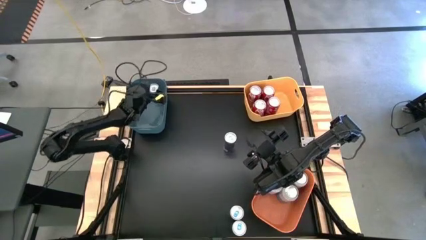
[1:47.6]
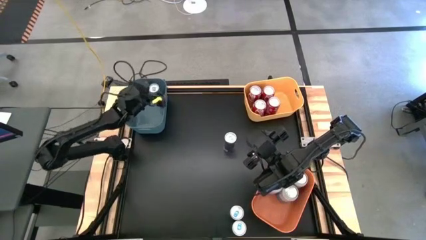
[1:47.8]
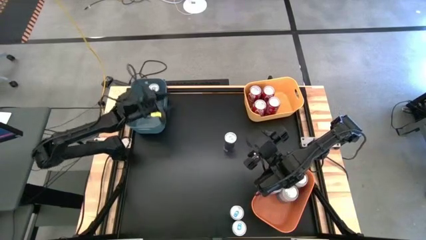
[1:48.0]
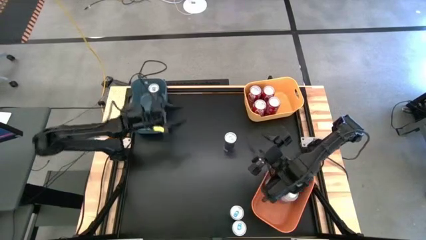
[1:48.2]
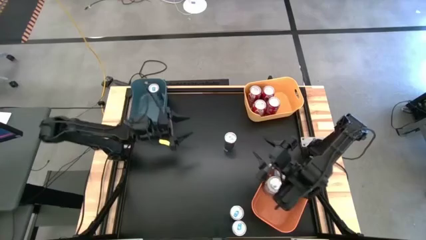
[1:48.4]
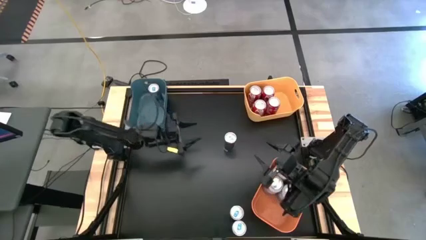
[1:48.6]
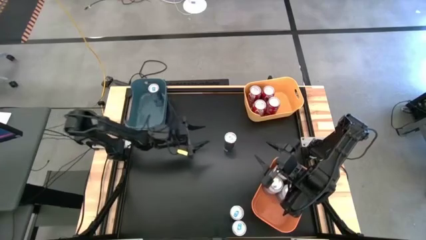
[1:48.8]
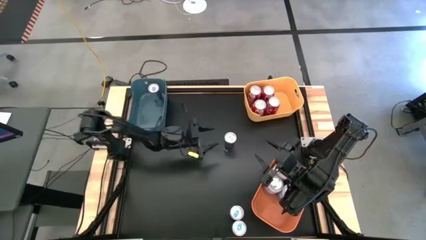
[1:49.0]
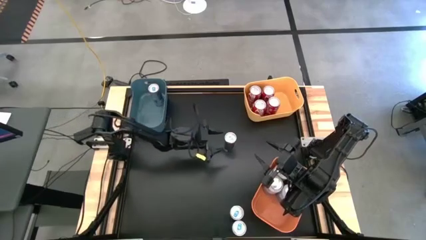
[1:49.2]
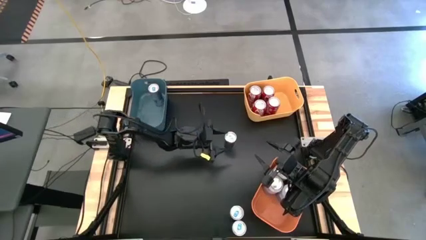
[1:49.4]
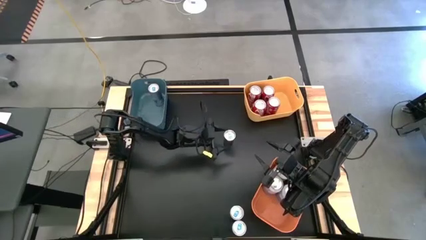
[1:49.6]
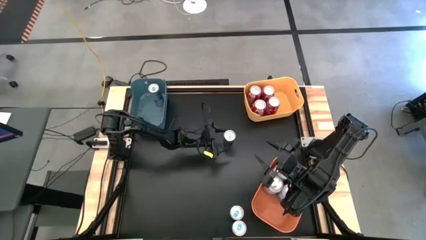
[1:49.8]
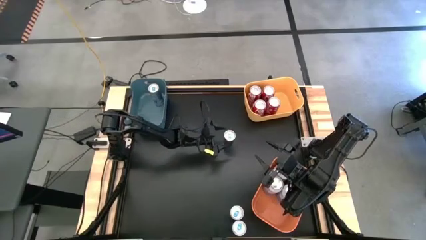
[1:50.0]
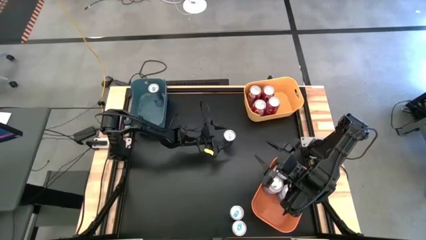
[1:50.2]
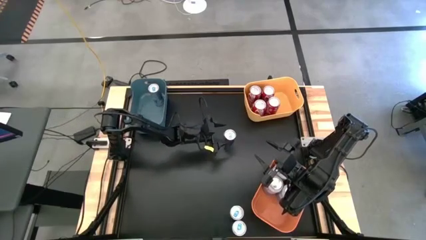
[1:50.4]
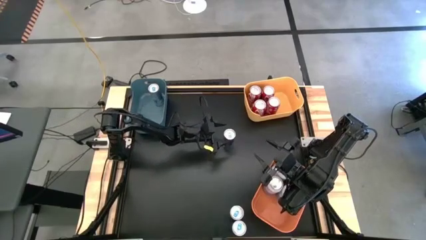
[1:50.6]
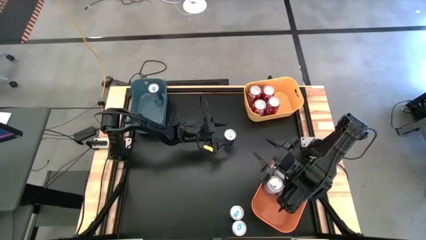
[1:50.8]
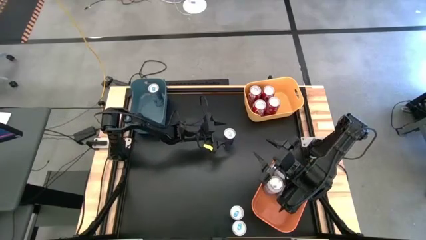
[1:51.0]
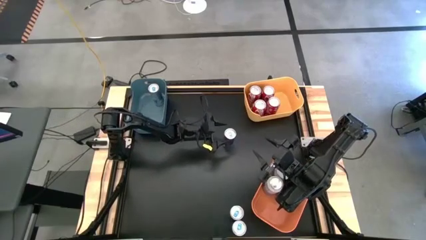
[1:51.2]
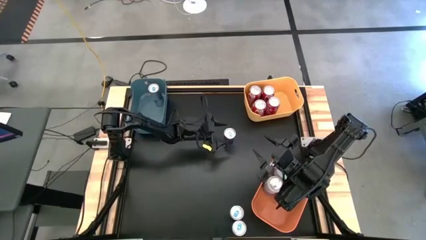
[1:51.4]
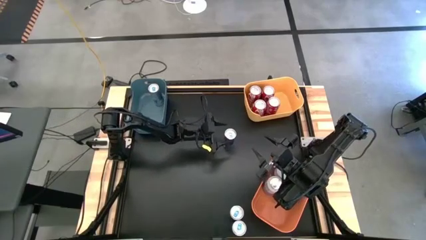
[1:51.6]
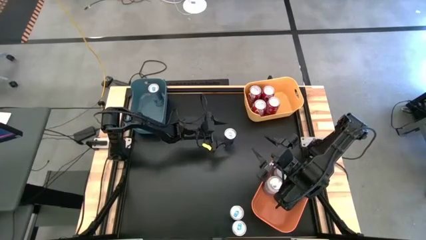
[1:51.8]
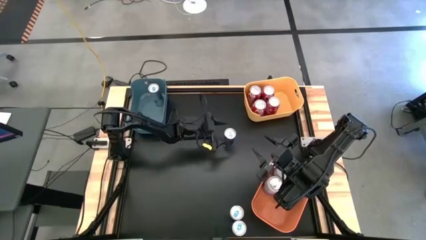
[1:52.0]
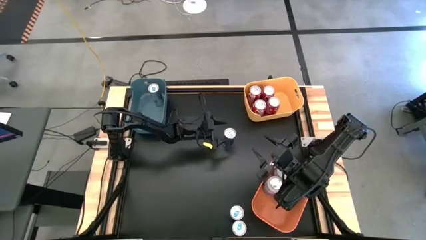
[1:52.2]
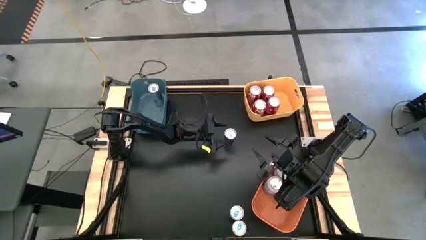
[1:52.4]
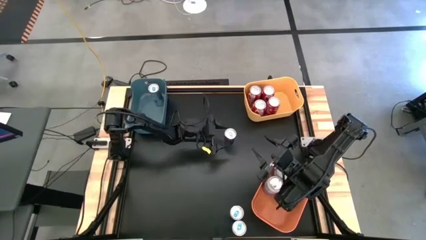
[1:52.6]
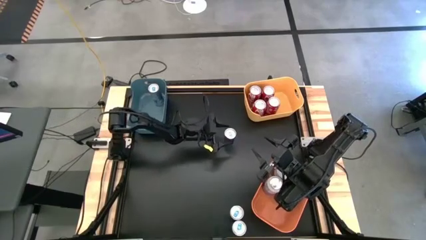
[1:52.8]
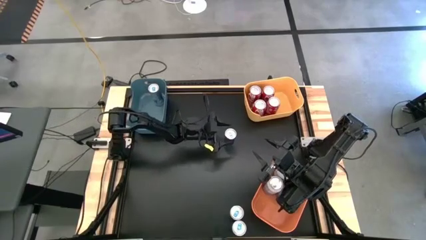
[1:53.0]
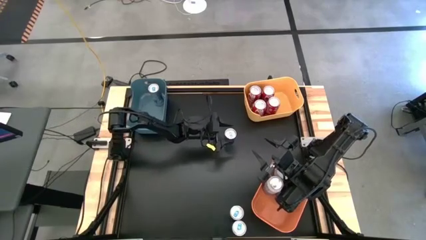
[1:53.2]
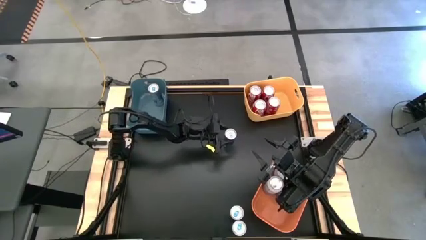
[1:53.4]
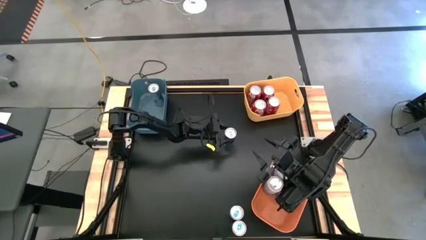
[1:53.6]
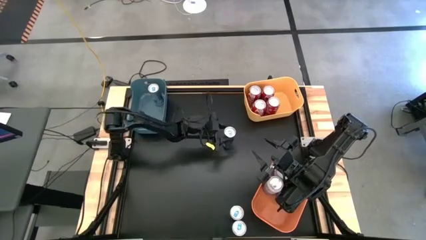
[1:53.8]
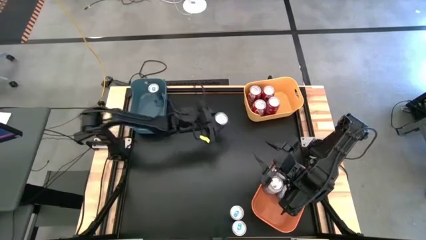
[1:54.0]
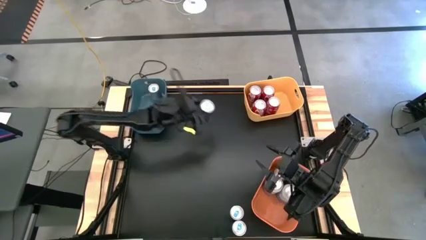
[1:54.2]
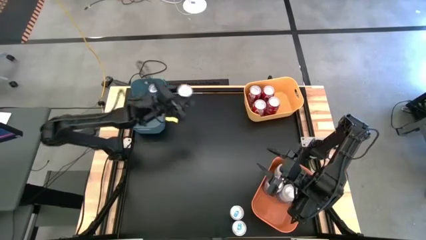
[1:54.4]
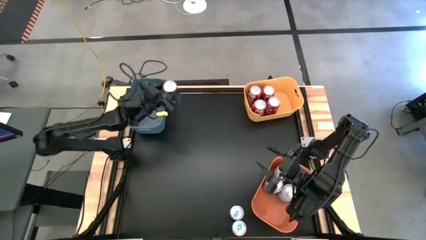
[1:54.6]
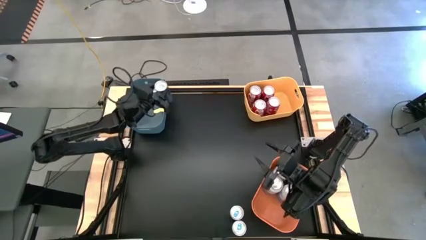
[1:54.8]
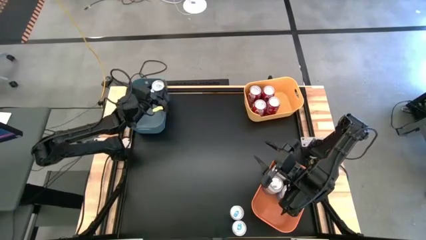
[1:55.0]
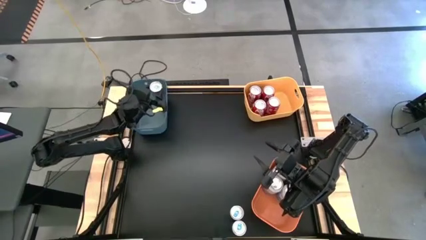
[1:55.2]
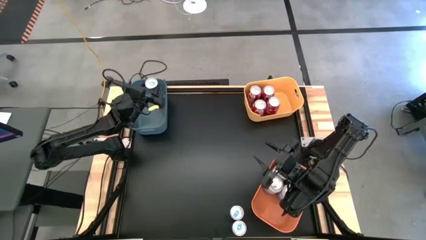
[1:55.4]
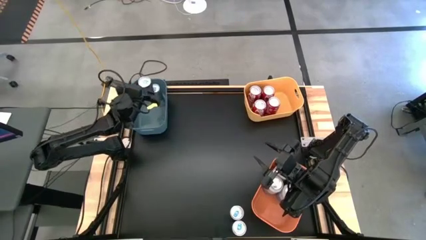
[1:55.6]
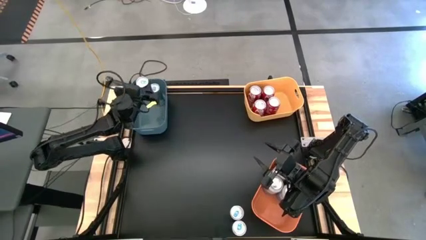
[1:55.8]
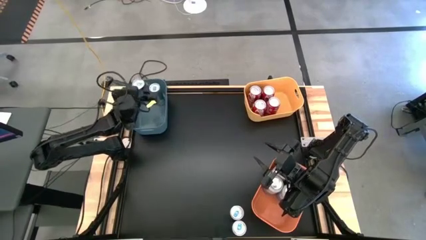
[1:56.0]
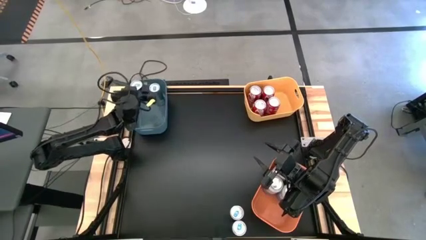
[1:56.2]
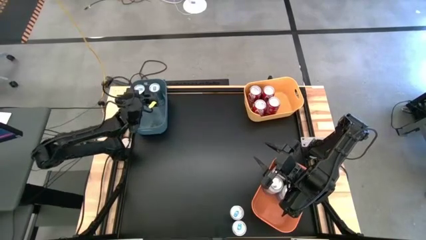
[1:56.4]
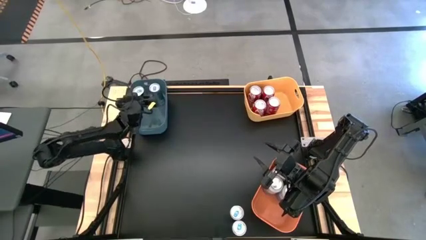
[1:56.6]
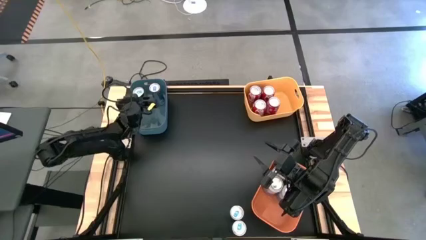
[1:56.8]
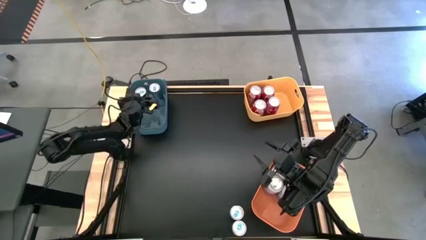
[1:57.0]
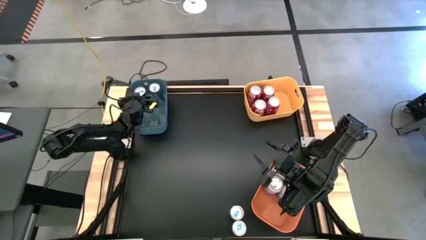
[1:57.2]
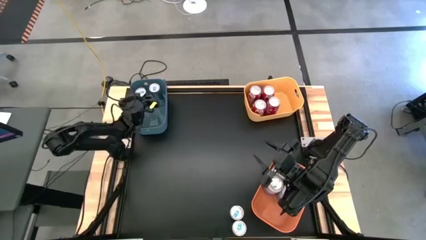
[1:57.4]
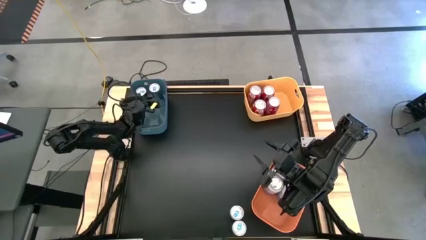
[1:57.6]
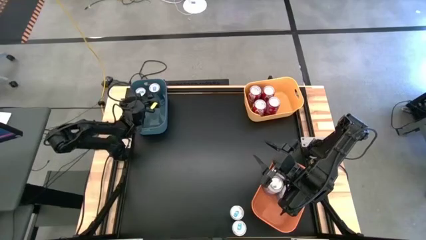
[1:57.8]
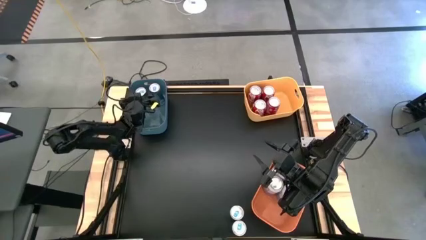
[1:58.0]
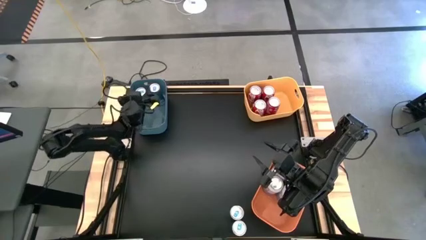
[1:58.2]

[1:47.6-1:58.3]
Task: Sort soda cans
Put the top blue soda can into the blue bin

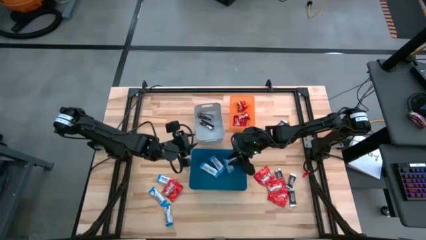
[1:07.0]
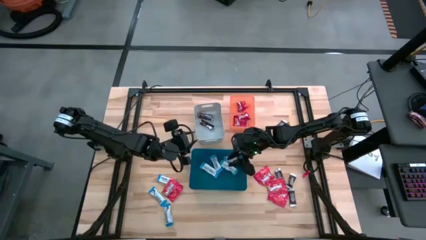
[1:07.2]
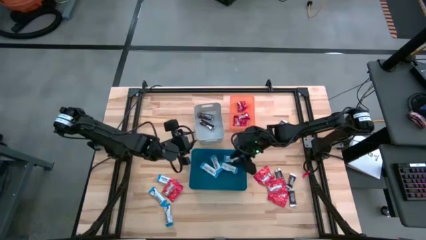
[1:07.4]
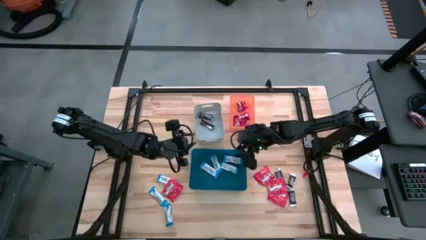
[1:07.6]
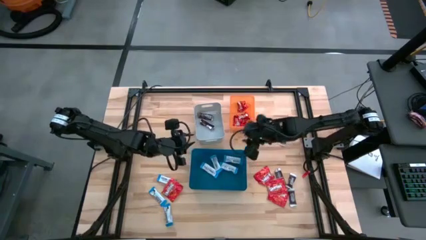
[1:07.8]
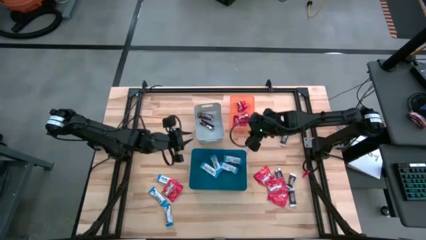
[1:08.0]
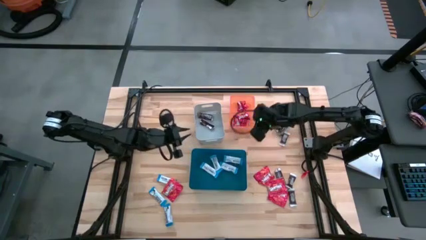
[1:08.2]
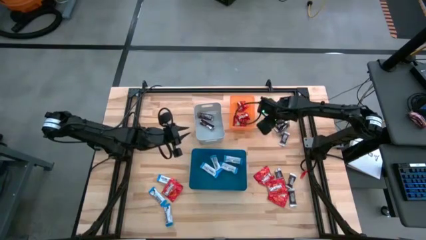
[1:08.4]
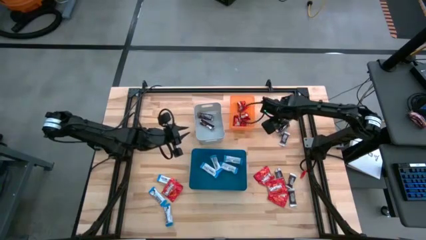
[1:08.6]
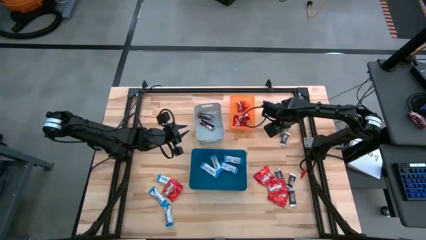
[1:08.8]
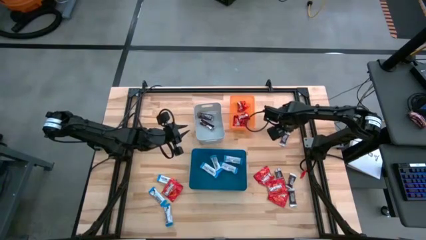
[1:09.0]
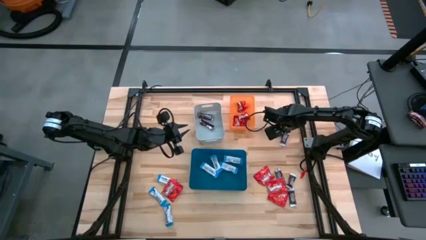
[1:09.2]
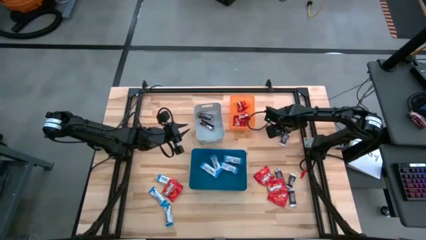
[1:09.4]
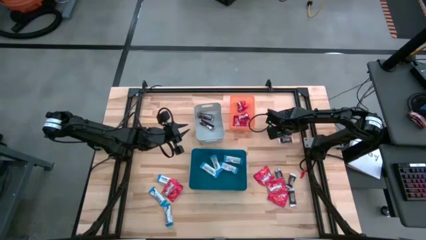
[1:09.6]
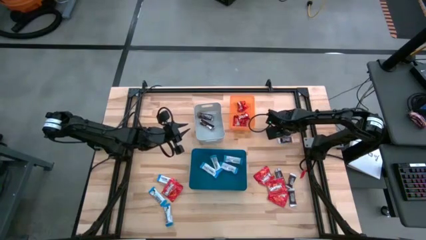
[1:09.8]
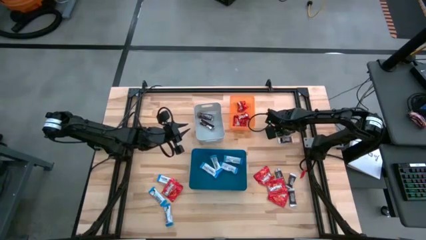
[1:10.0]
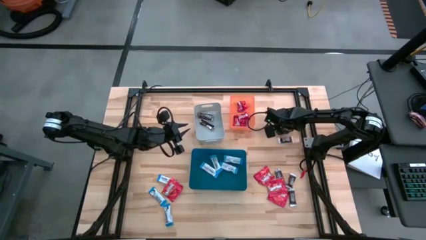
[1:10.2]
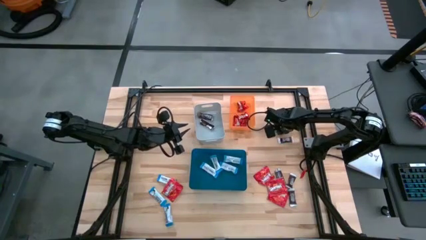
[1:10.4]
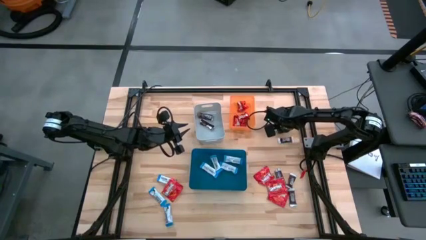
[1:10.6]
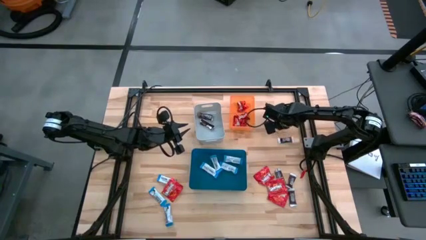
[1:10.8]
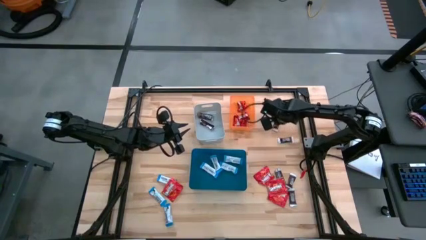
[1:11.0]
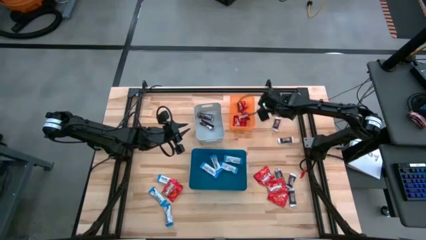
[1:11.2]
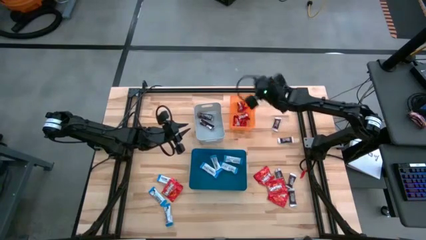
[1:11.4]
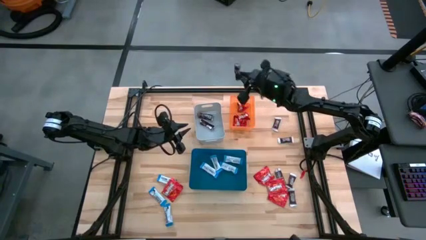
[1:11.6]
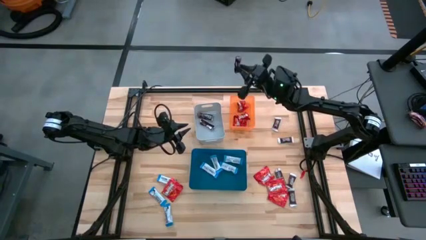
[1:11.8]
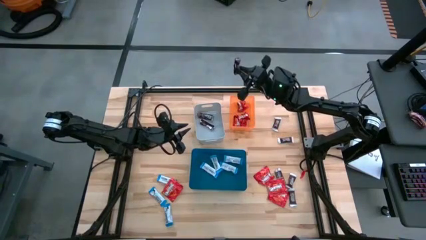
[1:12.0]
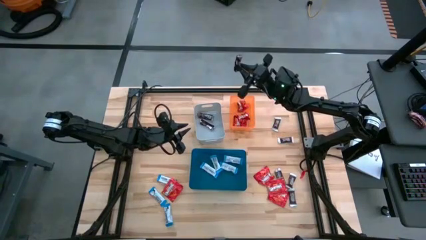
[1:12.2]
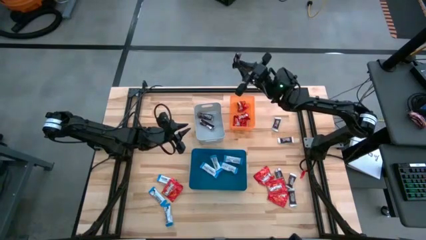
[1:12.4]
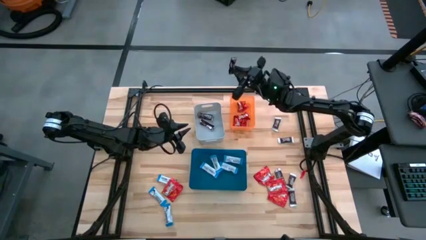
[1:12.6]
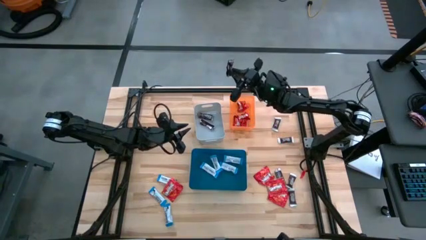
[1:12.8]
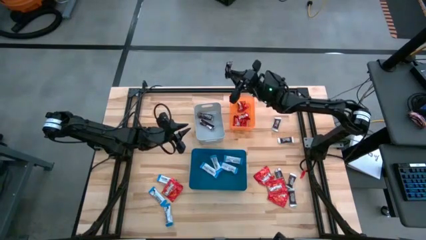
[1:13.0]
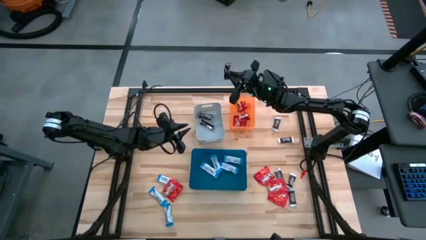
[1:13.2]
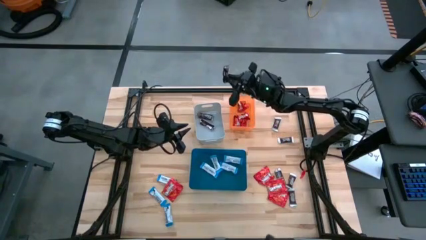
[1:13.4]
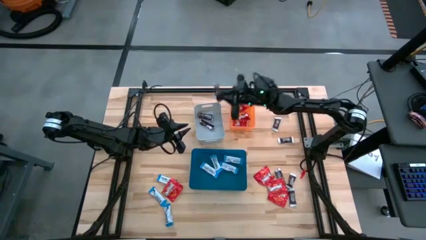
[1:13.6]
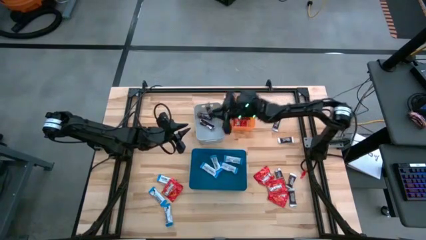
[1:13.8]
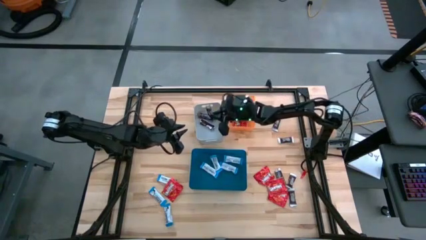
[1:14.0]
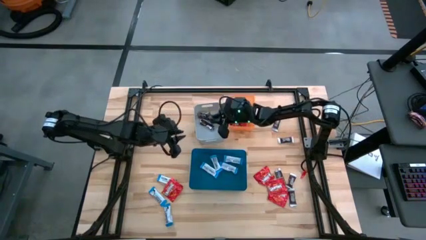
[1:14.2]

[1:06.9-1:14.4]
Task: Sort candy
Put the brown chocolate bar into the gray bin
